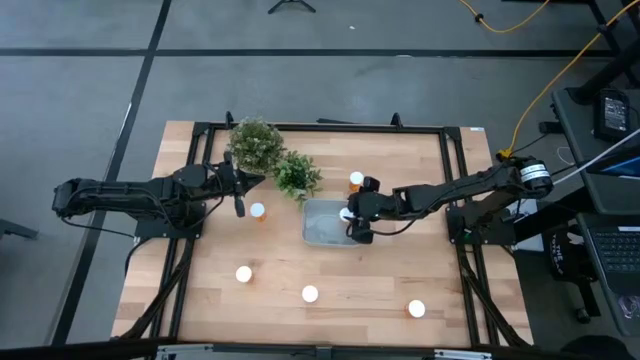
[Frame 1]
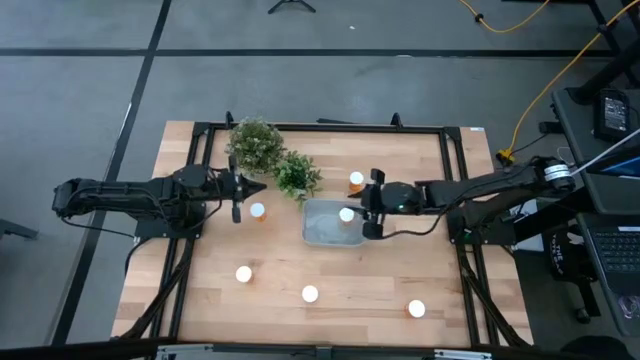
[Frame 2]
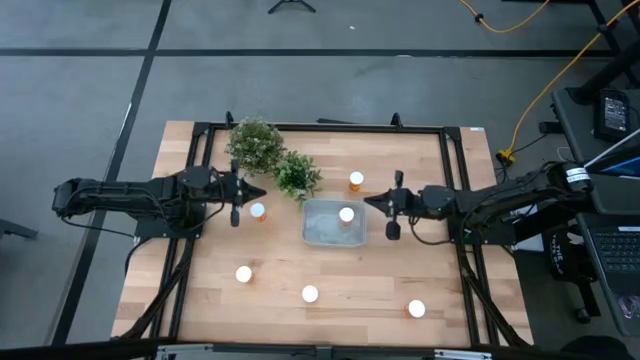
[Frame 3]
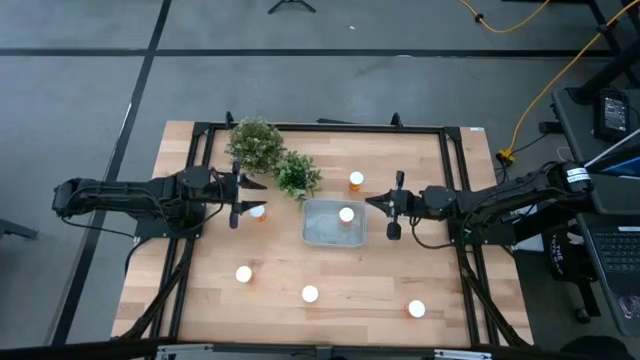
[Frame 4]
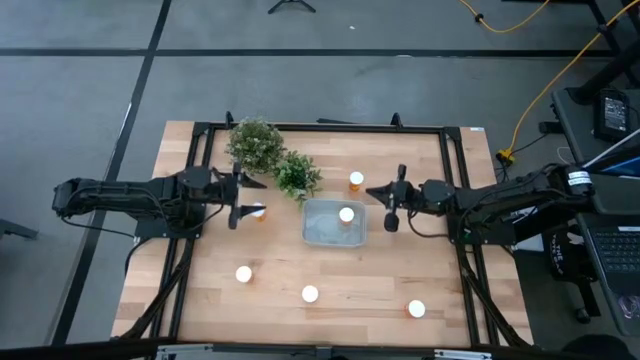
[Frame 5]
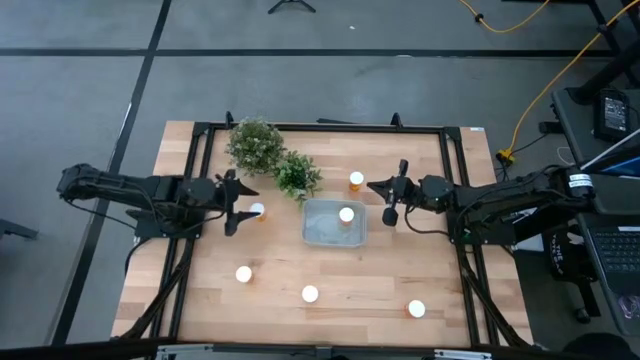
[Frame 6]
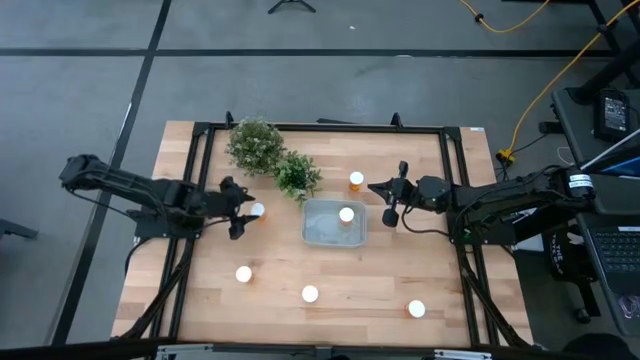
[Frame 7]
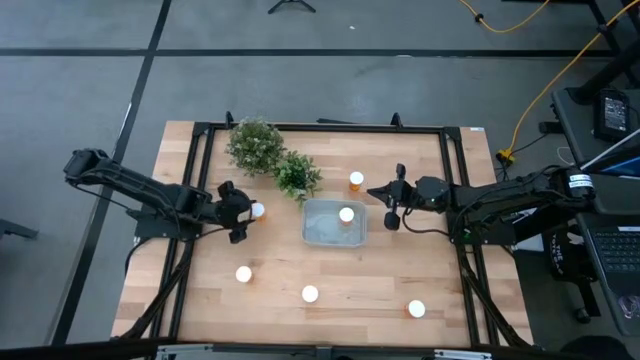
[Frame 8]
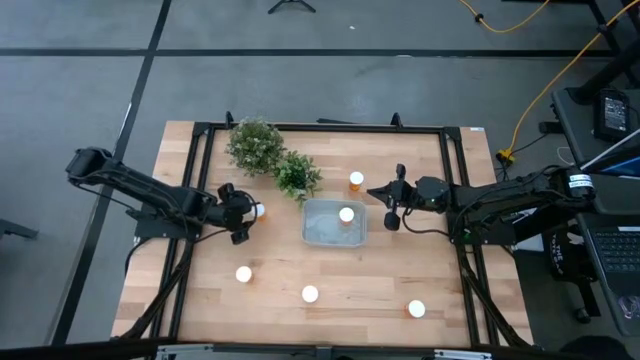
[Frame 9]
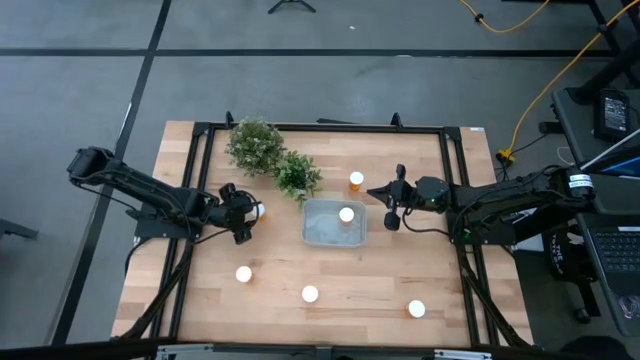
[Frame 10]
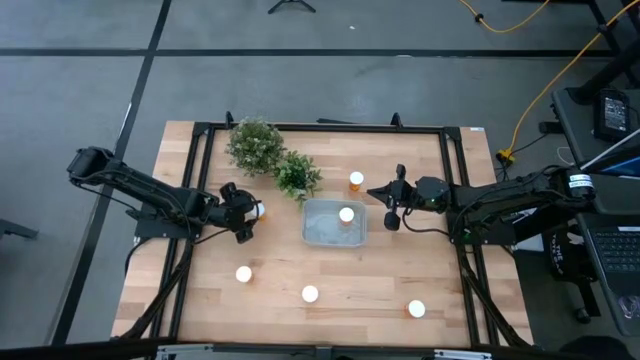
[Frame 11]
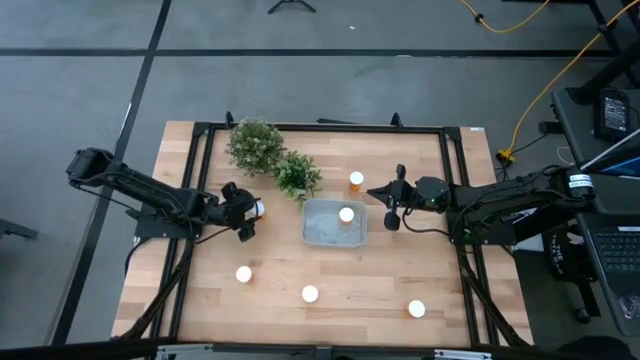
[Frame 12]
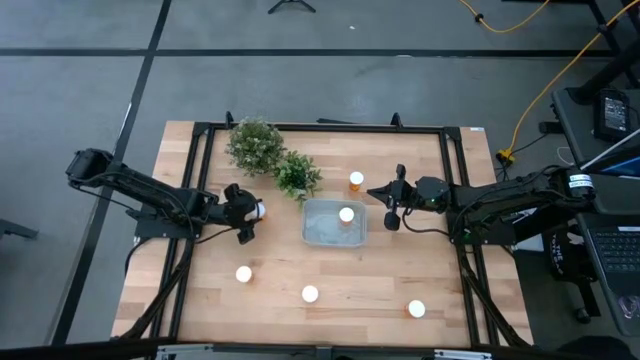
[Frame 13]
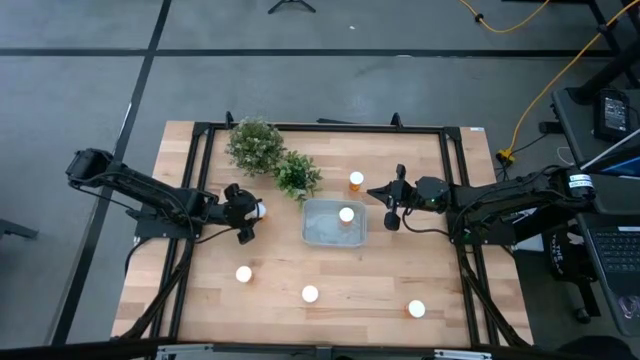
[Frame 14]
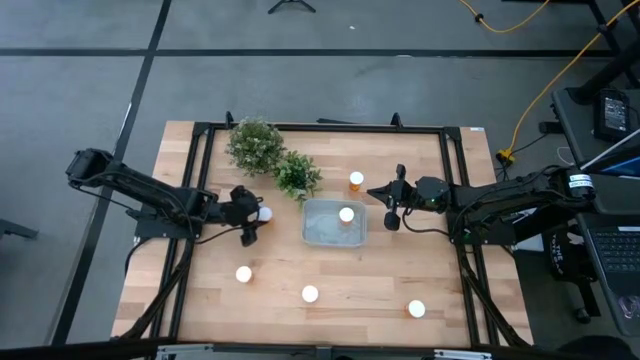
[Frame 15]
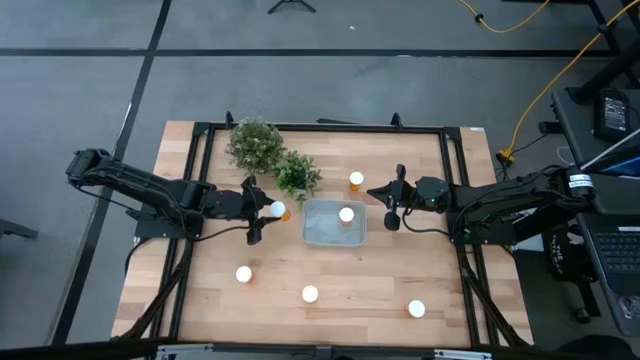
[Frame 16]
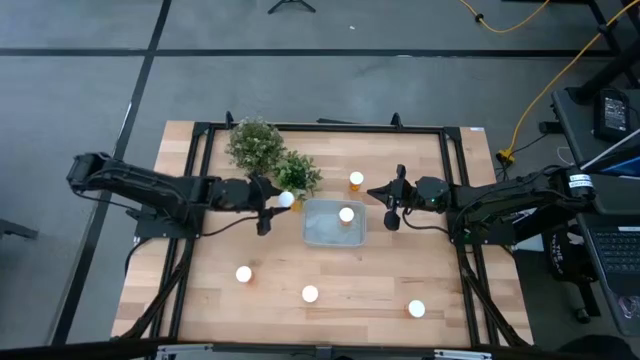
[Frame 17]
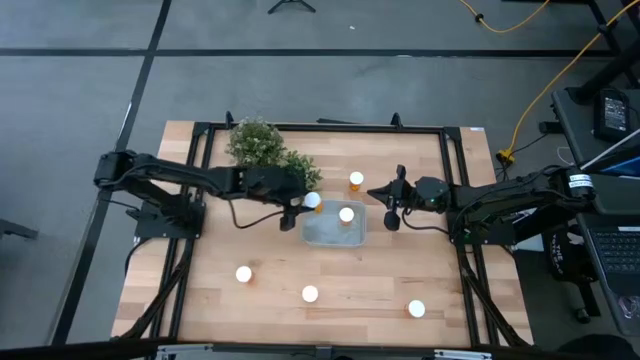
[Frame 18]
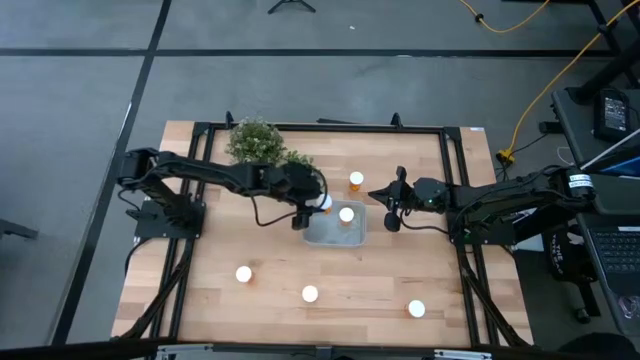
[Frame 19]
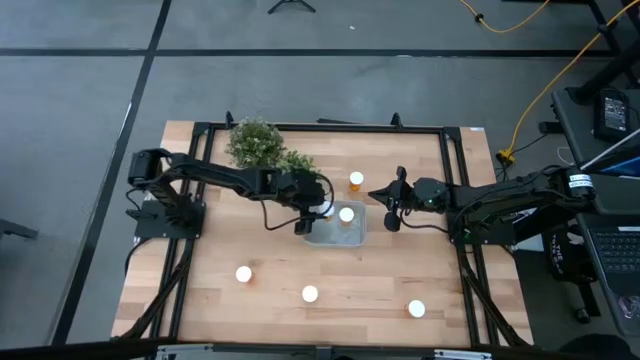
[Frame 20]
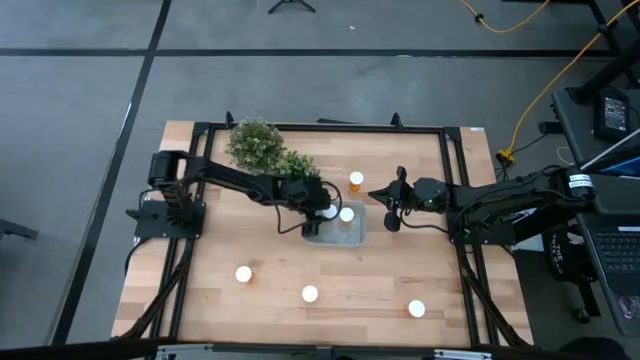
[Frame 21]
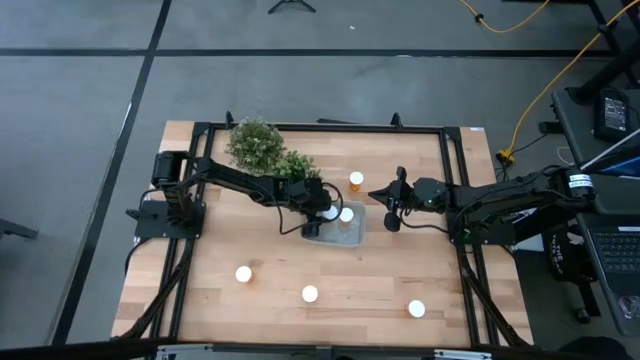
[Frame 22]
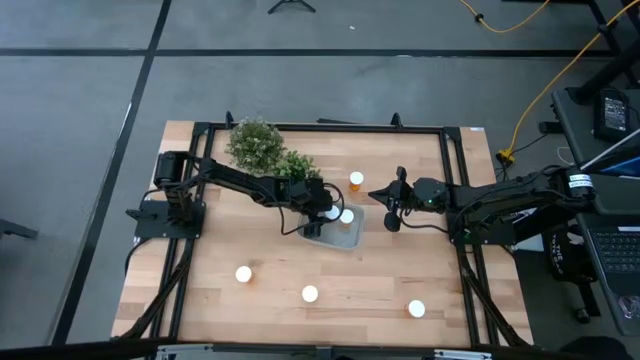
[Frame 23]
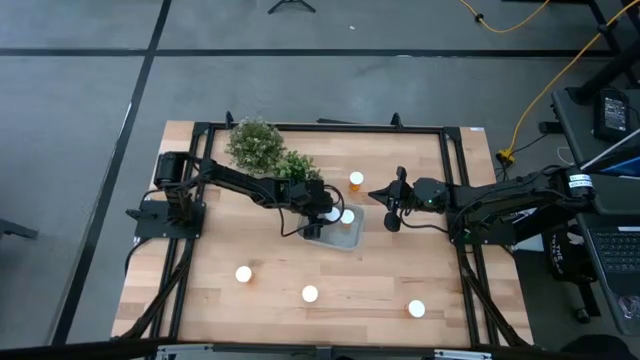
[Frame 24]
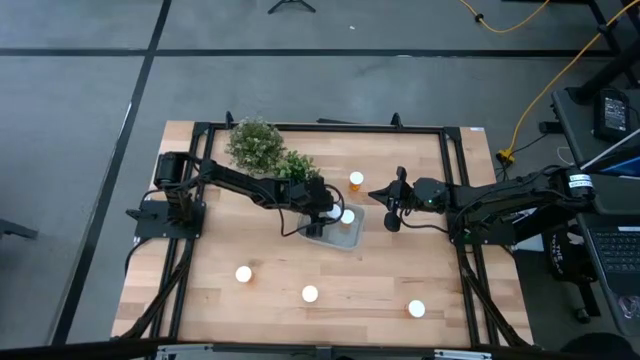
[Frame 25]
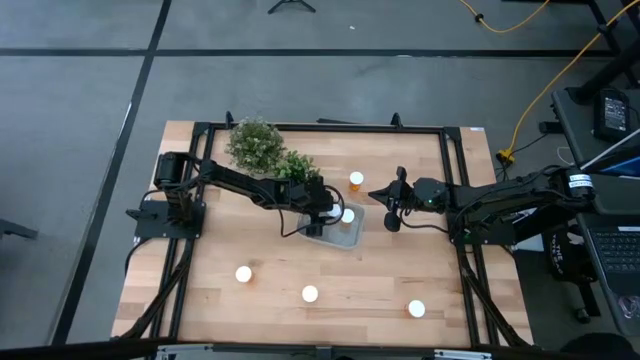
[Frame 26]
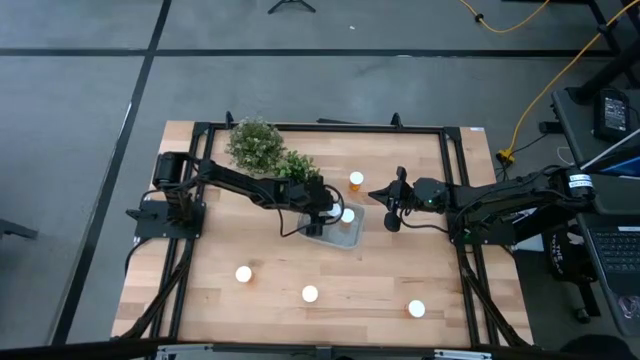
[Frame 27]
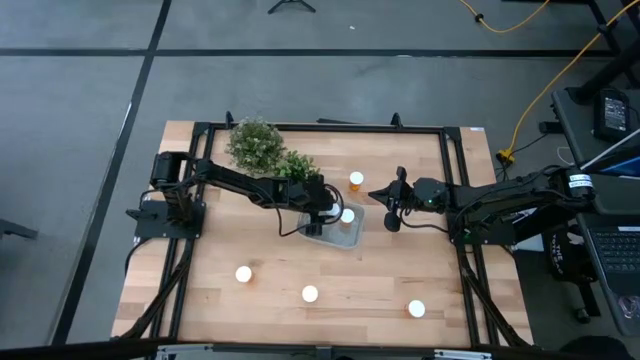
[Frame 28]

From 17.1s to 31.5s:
Task: Pick and place pill bottles into a basket
Put the orange pill bottle into the grey bin
